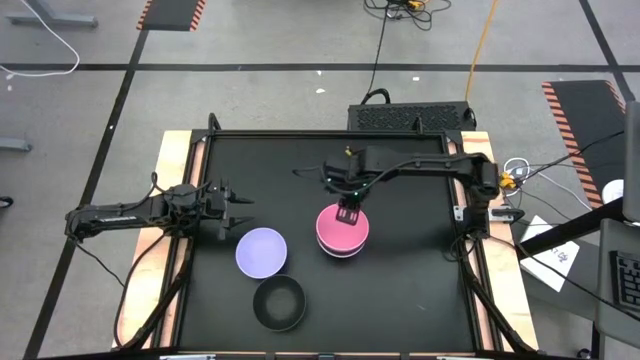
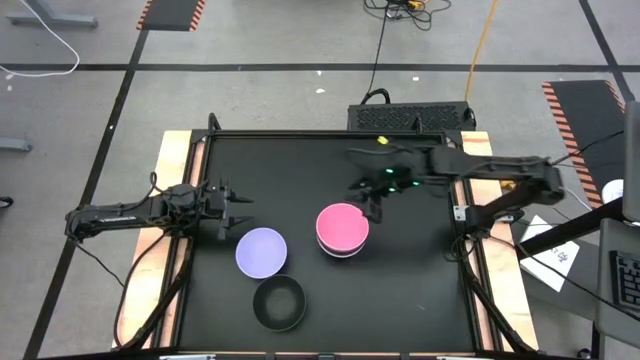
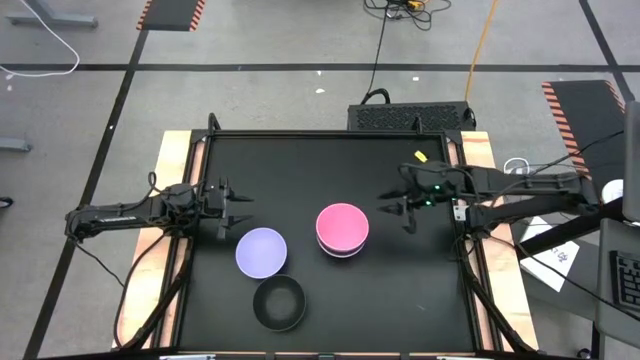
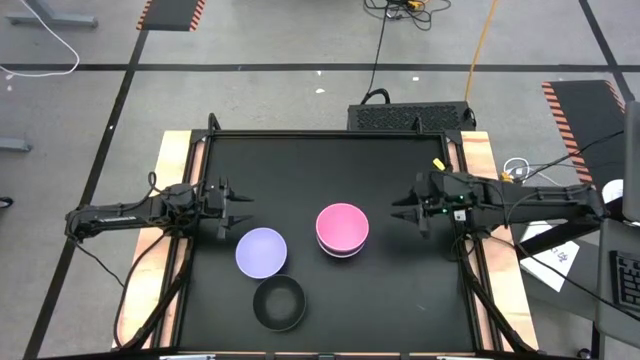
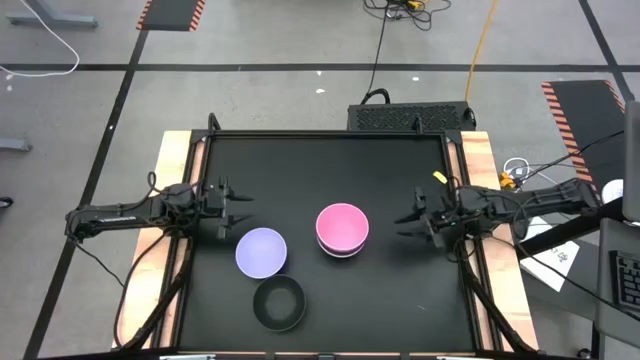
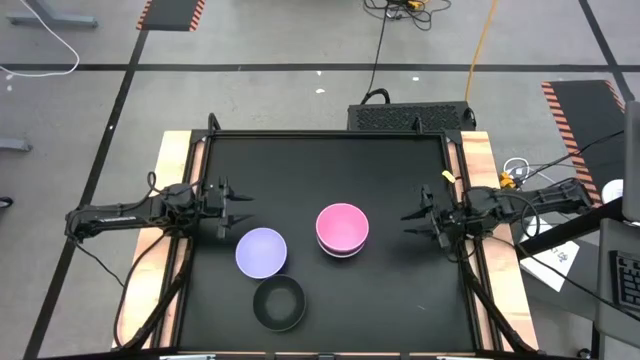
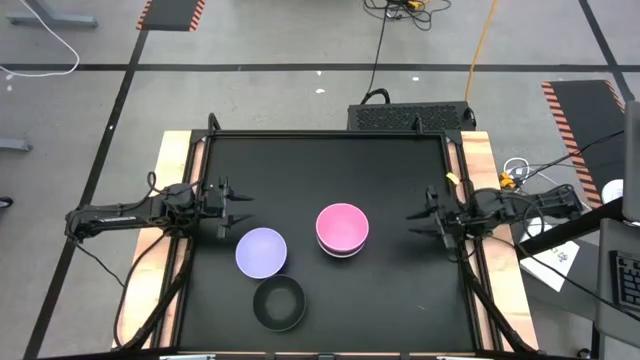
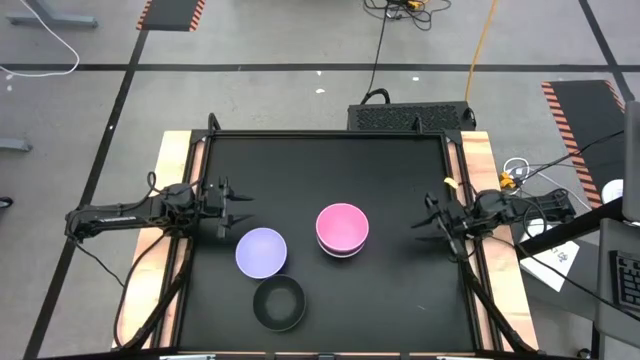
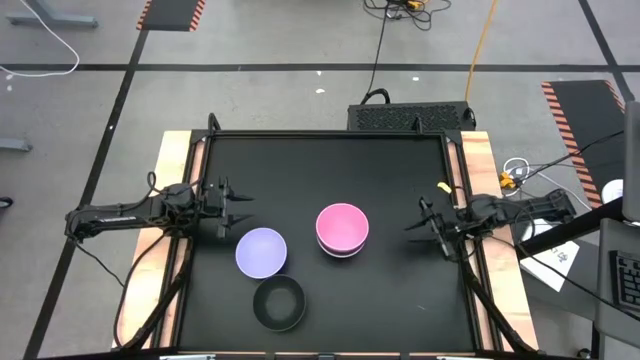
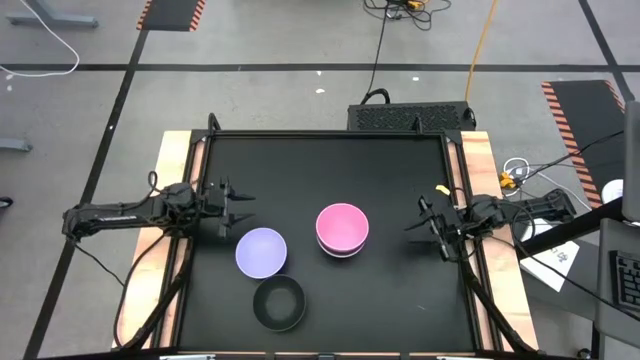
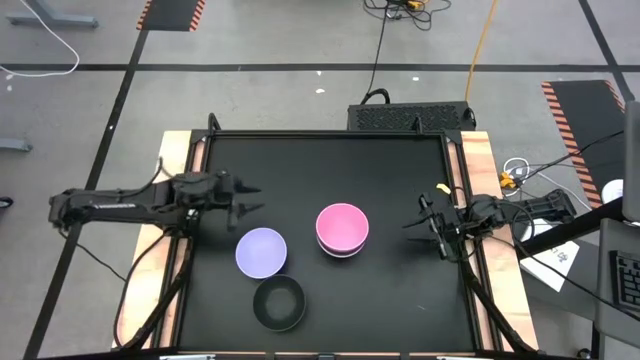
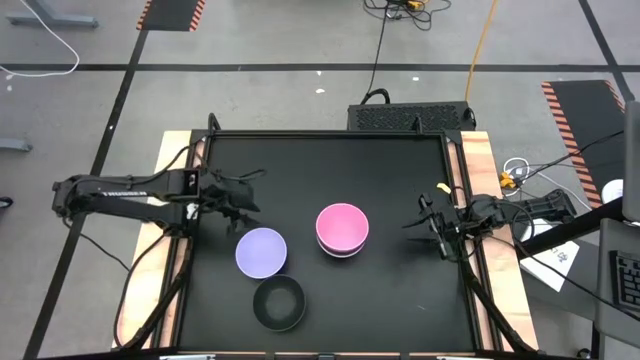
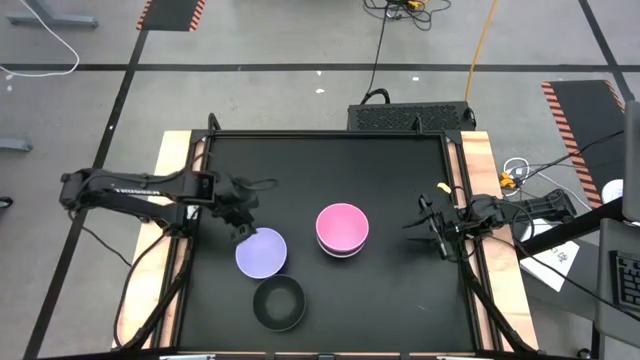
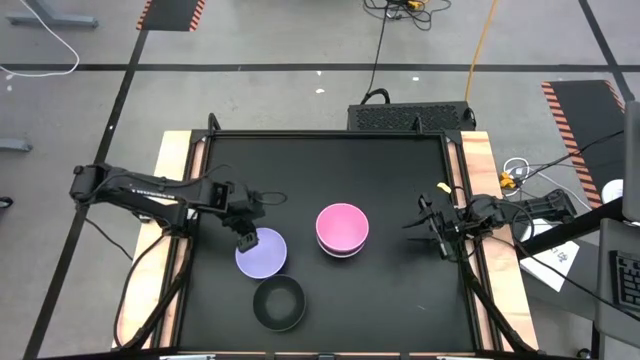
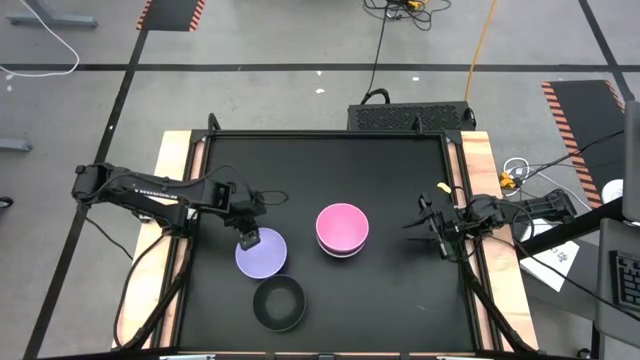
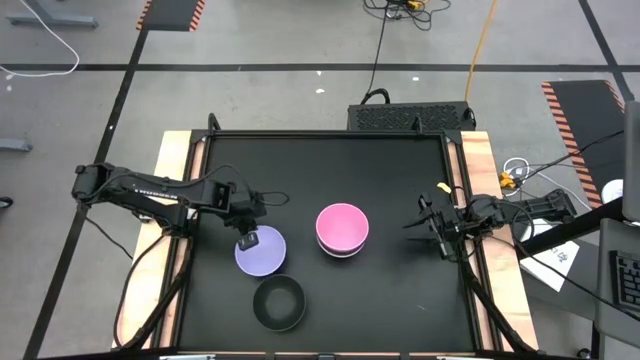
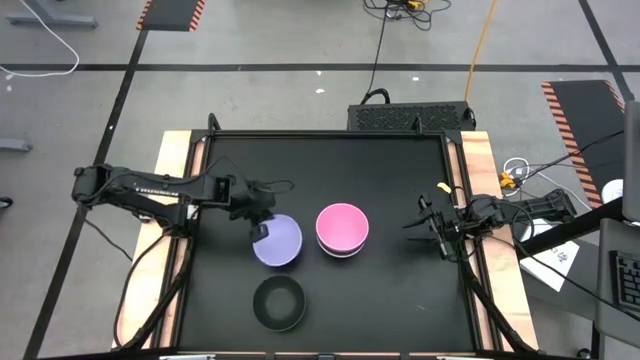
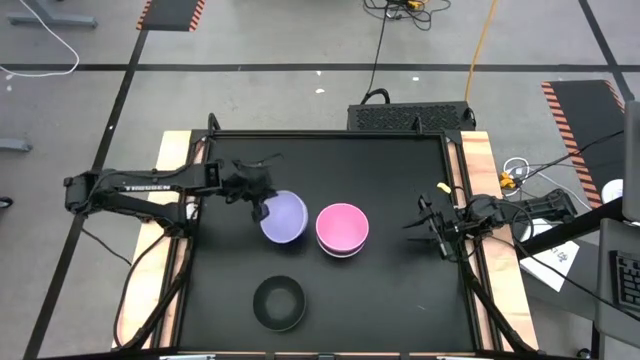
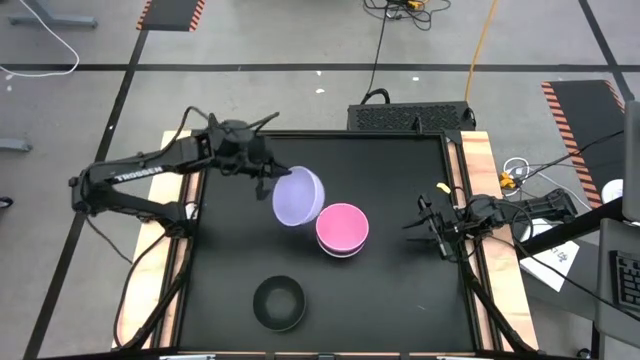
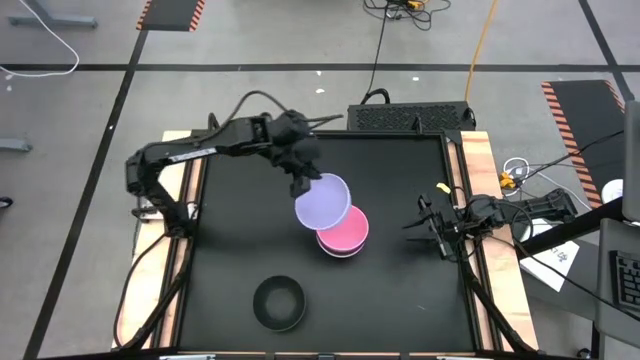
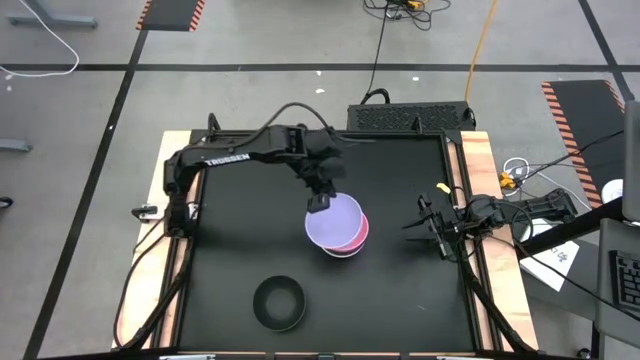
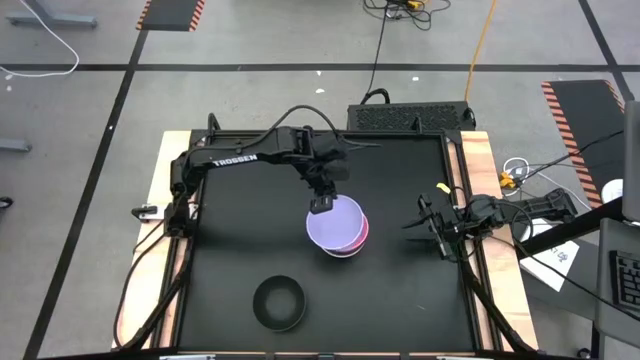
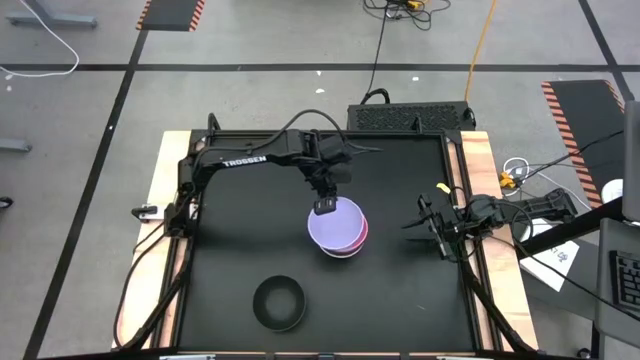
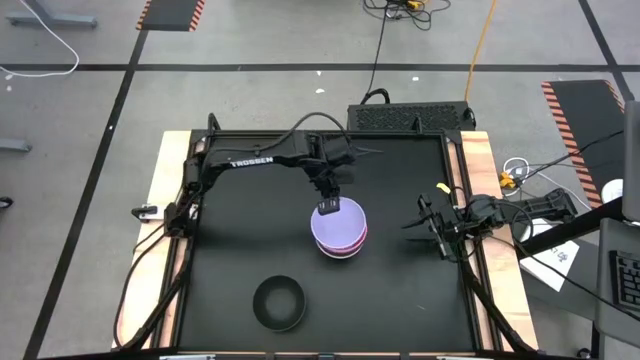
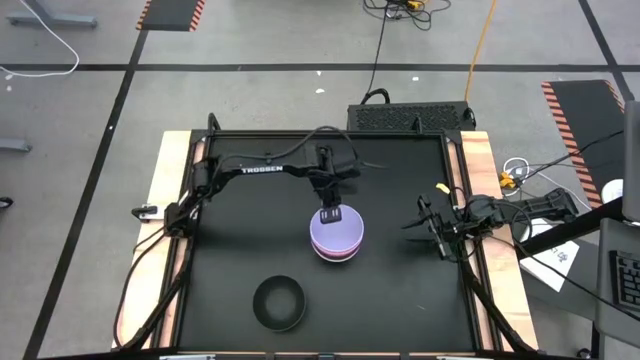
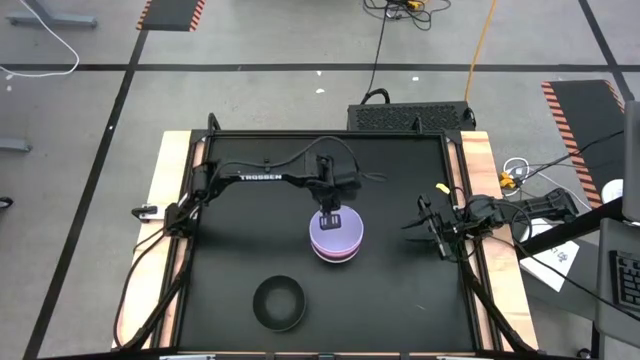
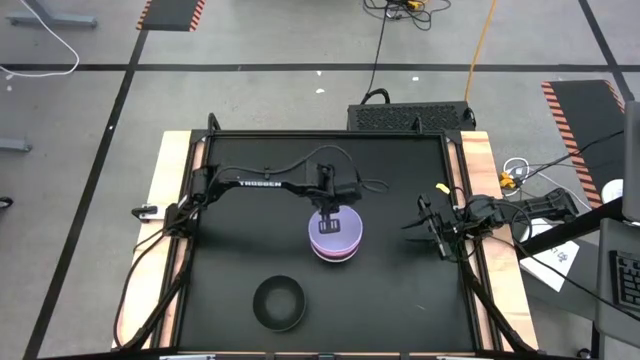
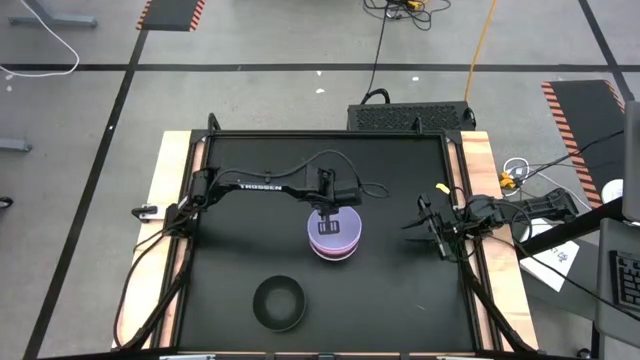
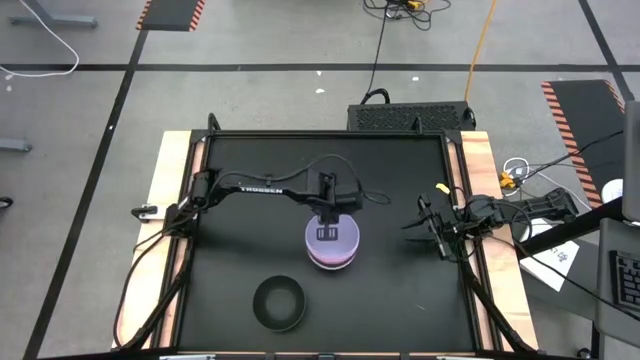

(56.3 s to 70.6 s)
Task: Nest bowls inside each other
Stack the purple bowl into the pink bowl

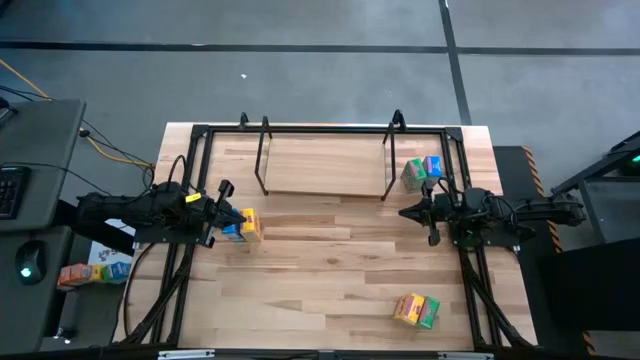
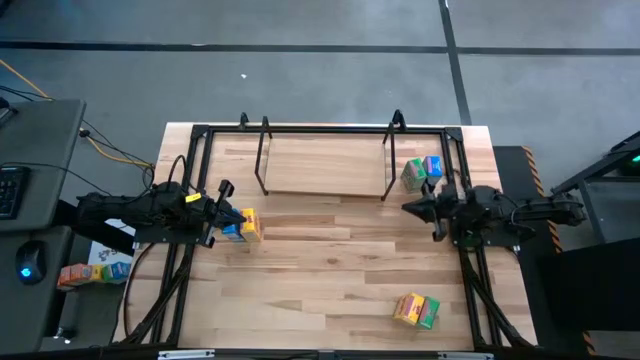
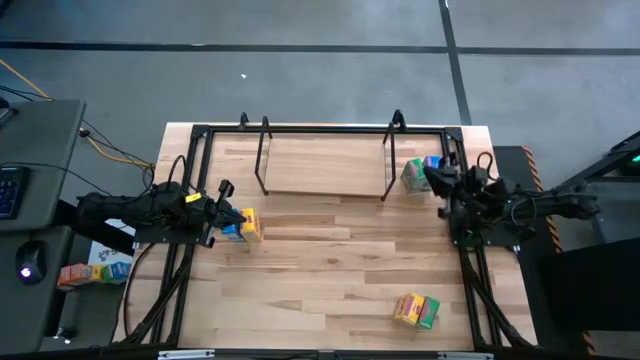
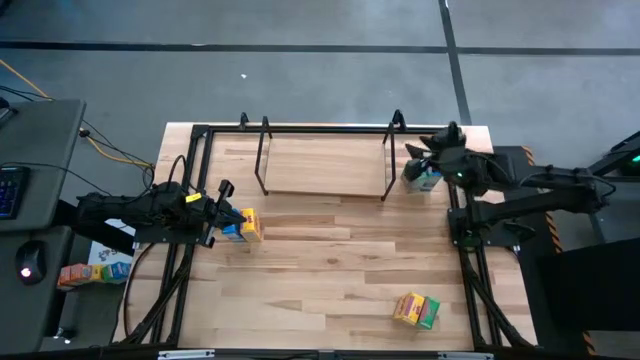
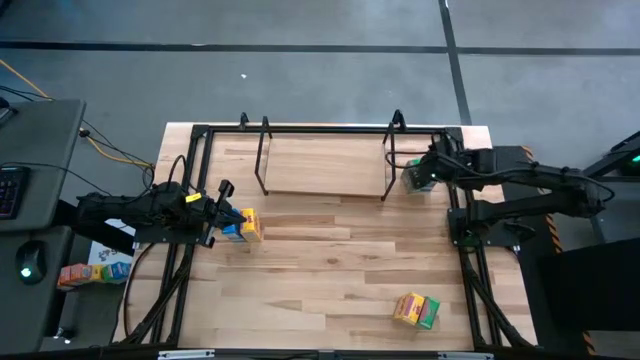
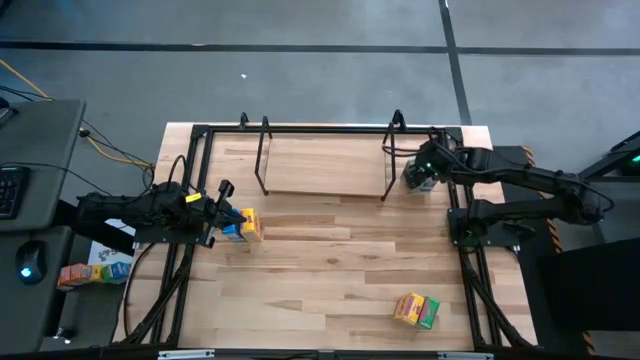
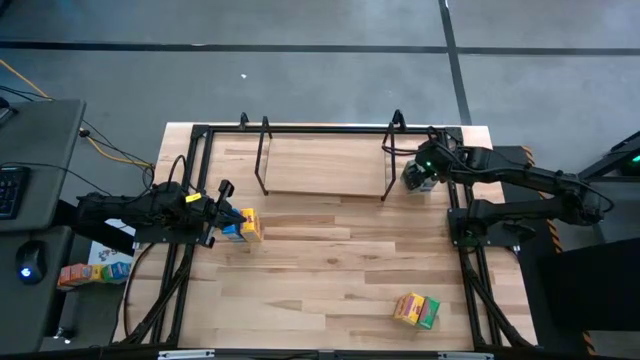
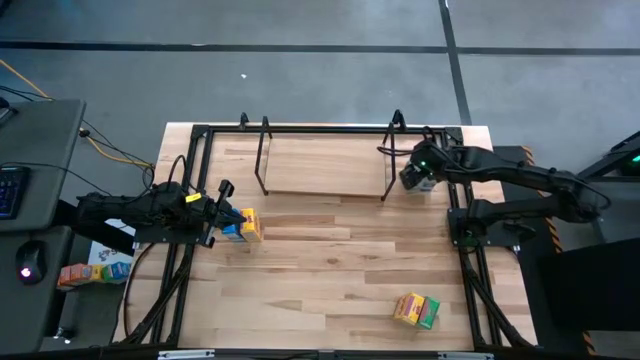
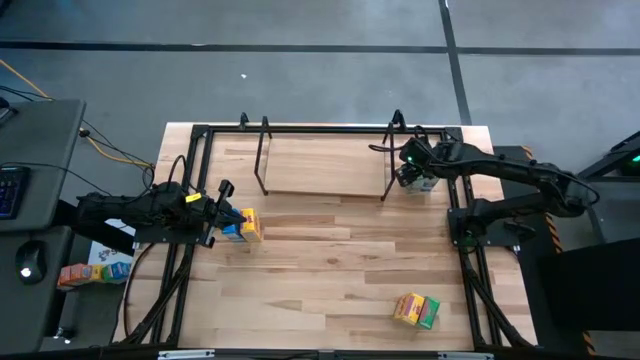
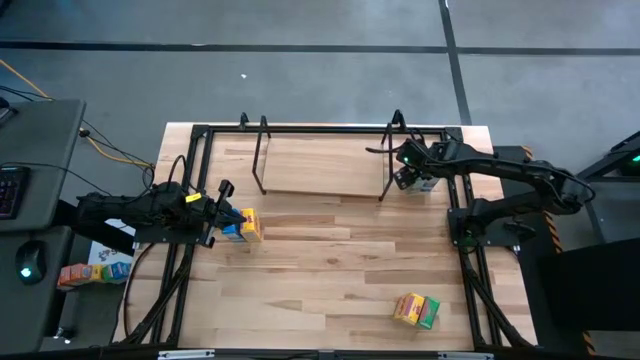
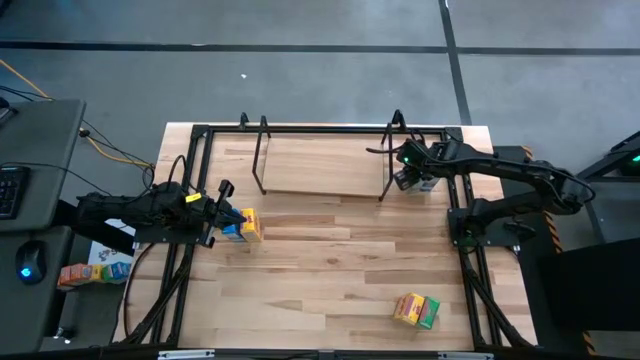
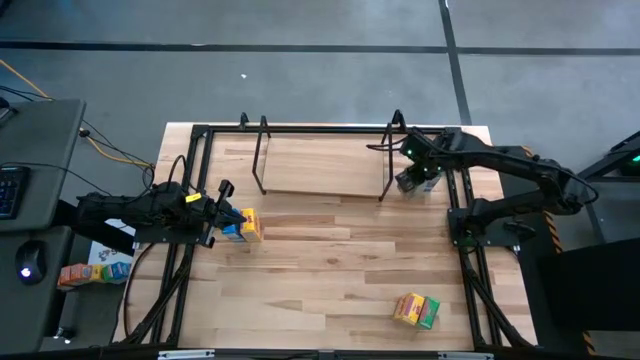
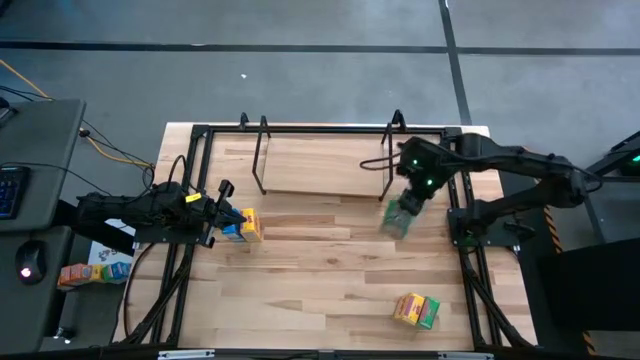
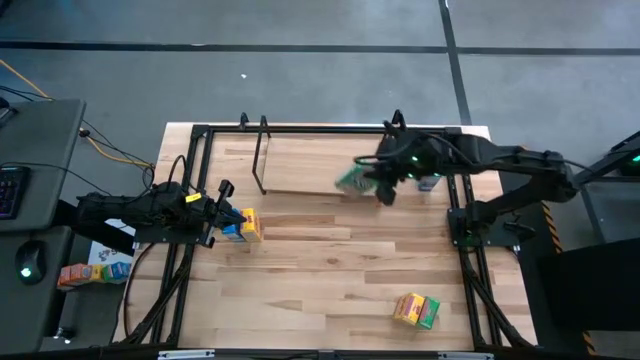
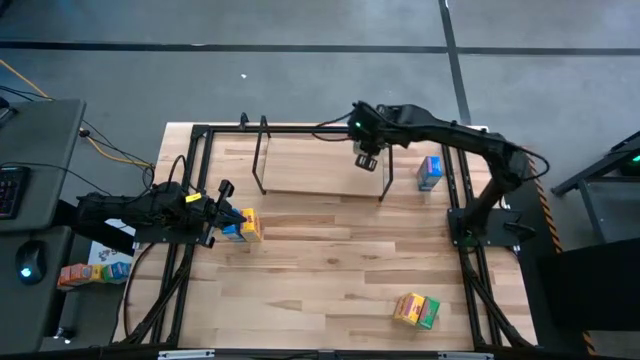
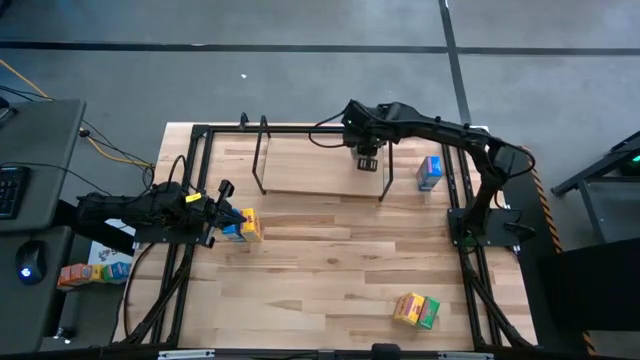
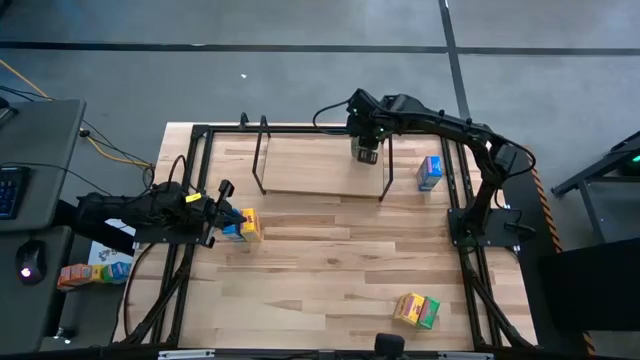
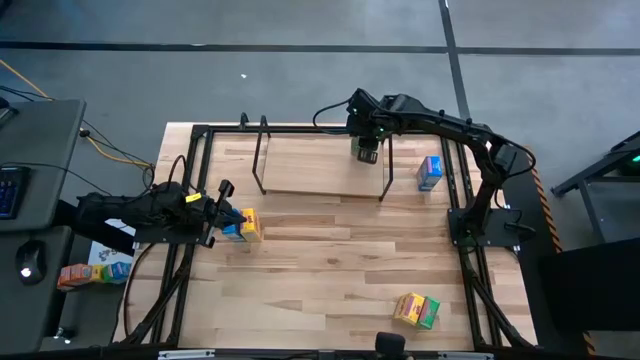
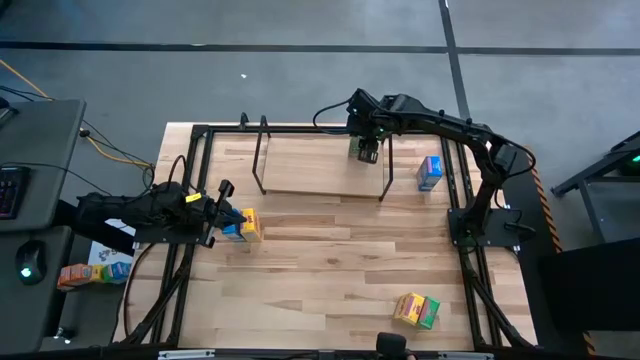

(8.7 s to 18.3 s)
Task: Stack cereal on shelf
Put the top green cereal box on the shelf
